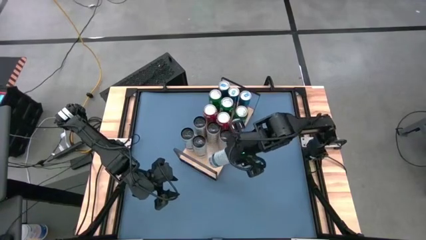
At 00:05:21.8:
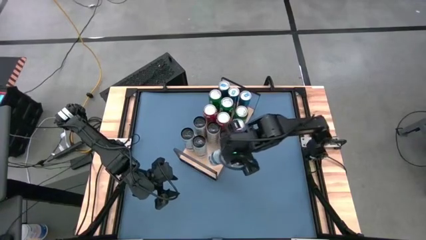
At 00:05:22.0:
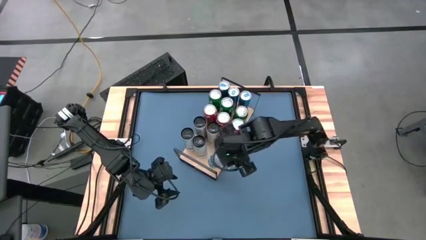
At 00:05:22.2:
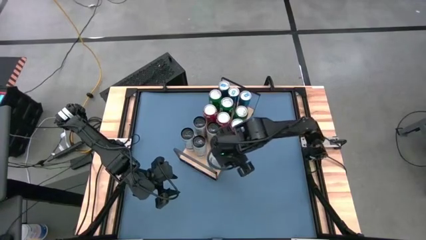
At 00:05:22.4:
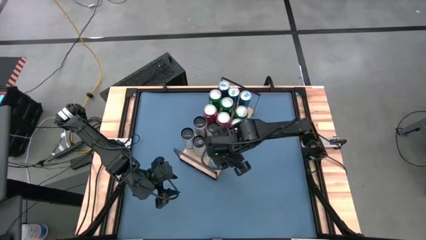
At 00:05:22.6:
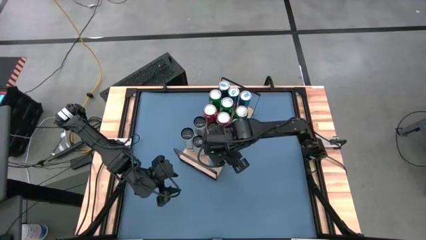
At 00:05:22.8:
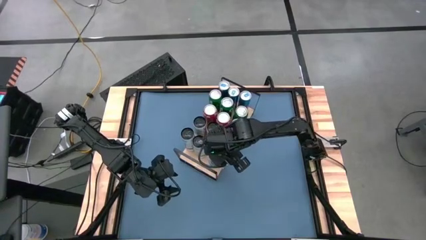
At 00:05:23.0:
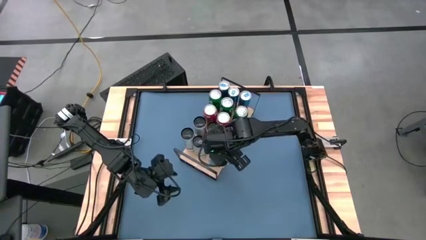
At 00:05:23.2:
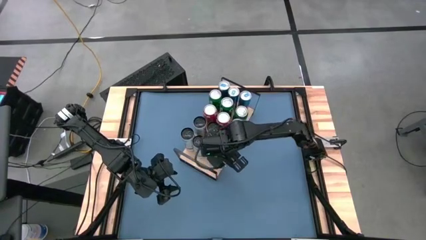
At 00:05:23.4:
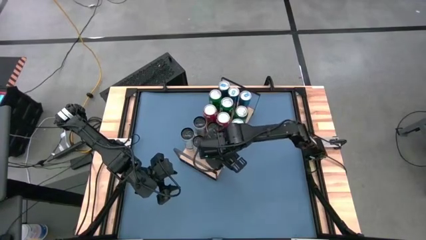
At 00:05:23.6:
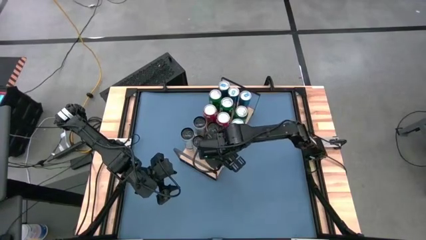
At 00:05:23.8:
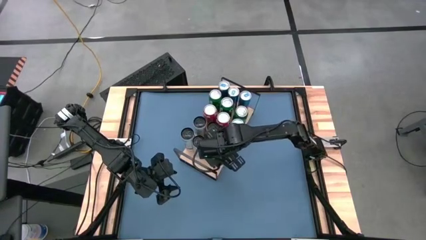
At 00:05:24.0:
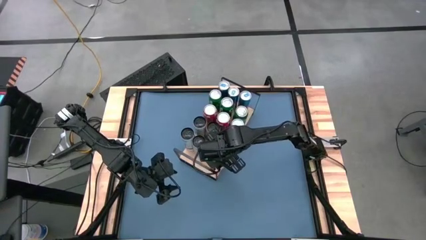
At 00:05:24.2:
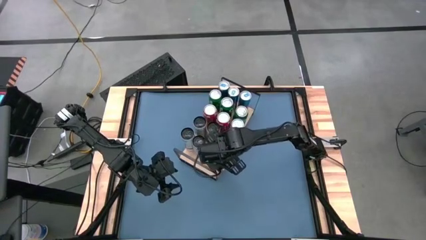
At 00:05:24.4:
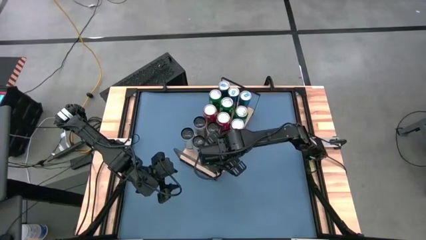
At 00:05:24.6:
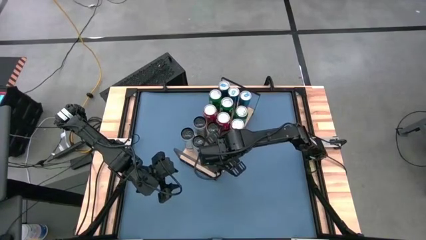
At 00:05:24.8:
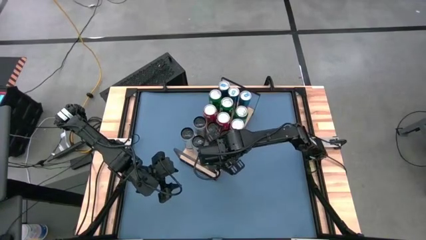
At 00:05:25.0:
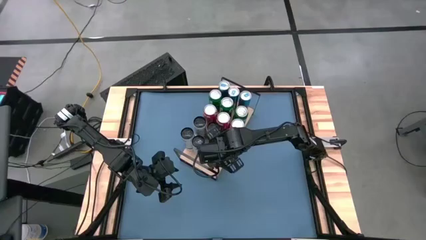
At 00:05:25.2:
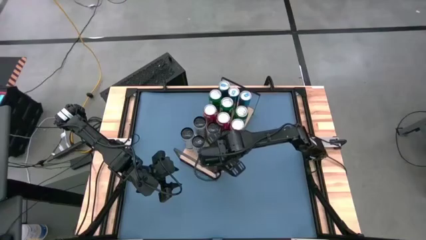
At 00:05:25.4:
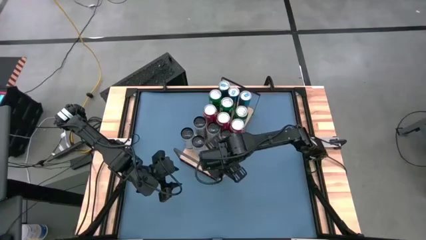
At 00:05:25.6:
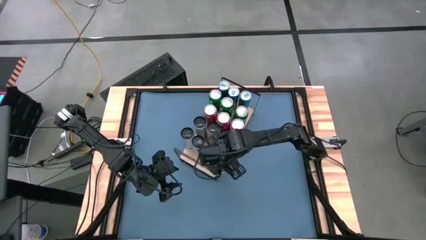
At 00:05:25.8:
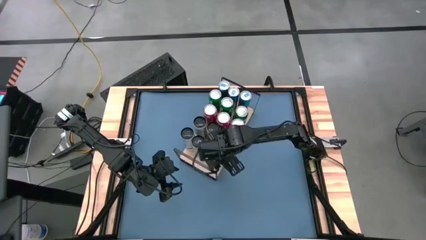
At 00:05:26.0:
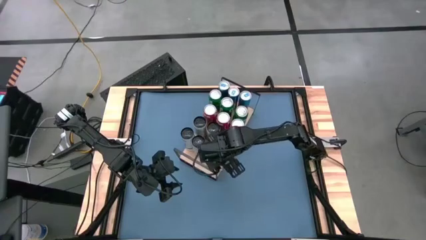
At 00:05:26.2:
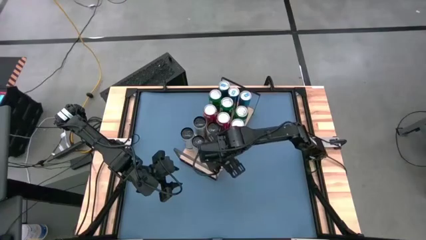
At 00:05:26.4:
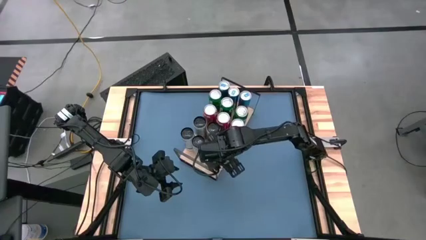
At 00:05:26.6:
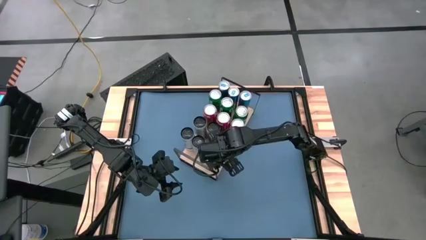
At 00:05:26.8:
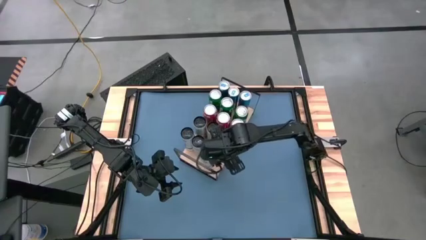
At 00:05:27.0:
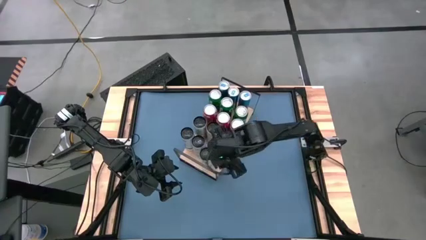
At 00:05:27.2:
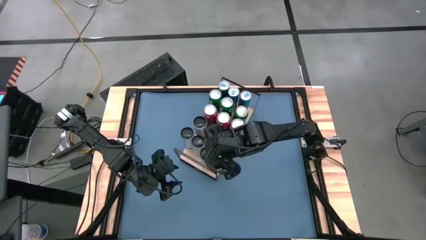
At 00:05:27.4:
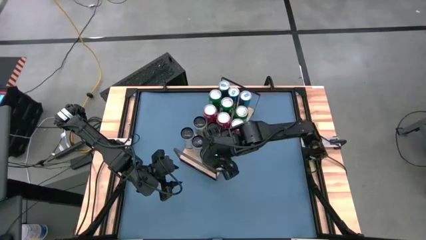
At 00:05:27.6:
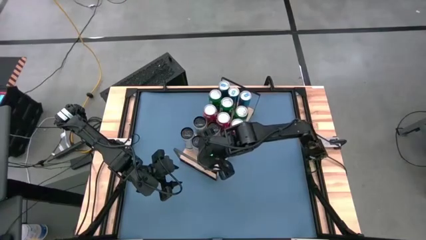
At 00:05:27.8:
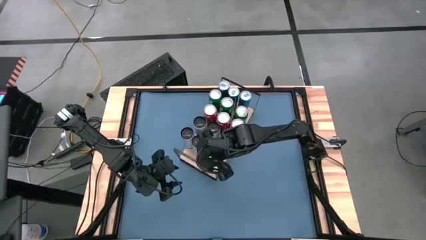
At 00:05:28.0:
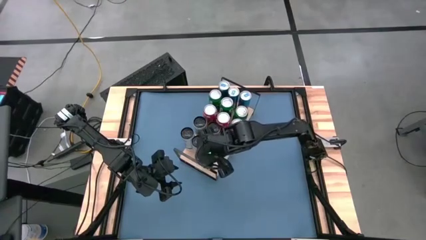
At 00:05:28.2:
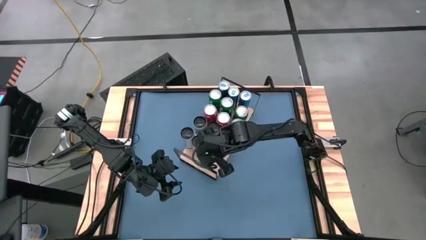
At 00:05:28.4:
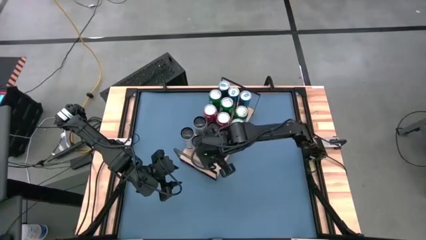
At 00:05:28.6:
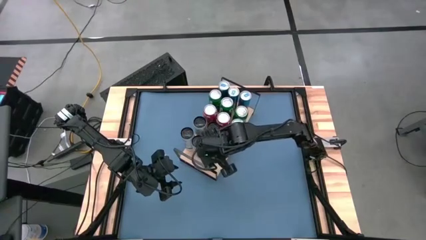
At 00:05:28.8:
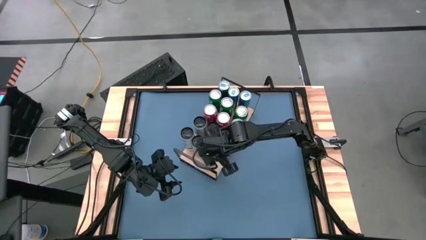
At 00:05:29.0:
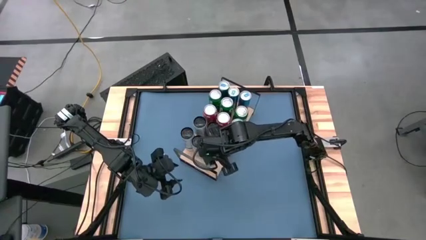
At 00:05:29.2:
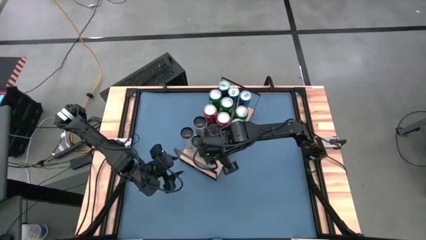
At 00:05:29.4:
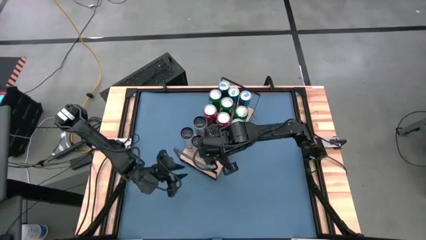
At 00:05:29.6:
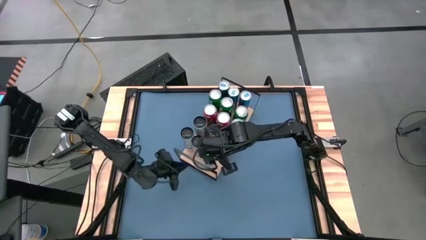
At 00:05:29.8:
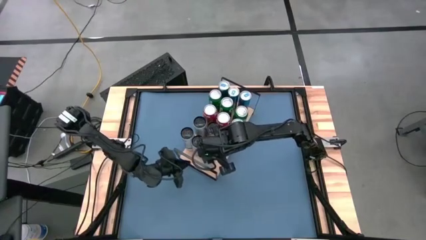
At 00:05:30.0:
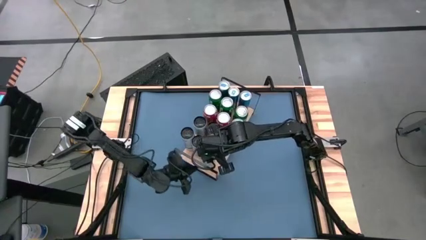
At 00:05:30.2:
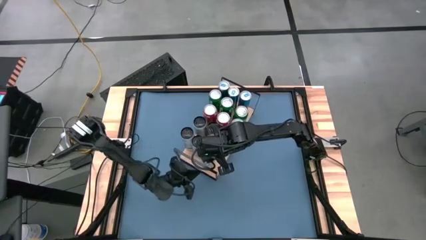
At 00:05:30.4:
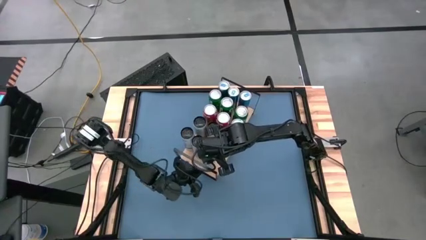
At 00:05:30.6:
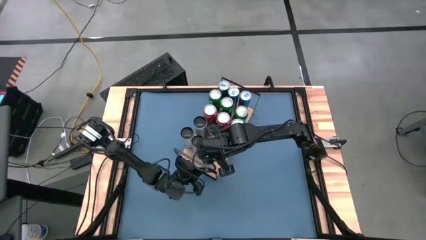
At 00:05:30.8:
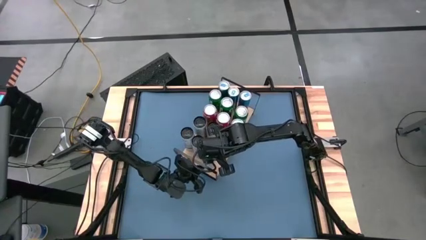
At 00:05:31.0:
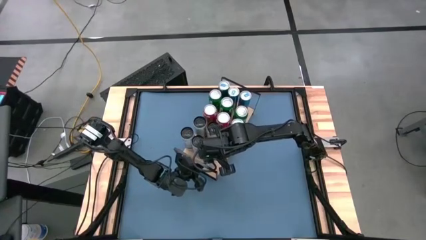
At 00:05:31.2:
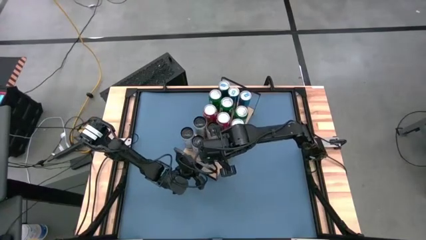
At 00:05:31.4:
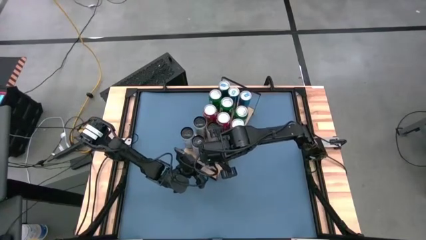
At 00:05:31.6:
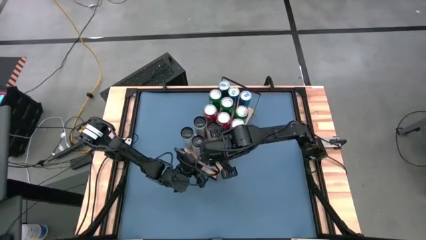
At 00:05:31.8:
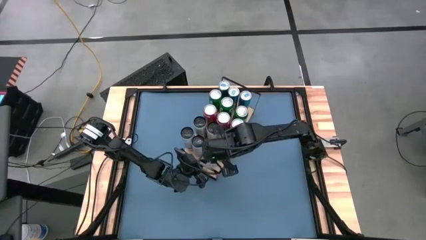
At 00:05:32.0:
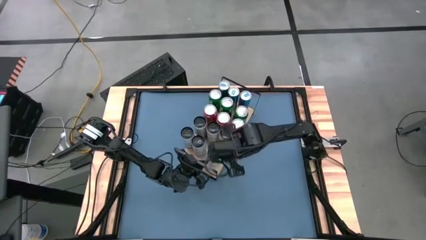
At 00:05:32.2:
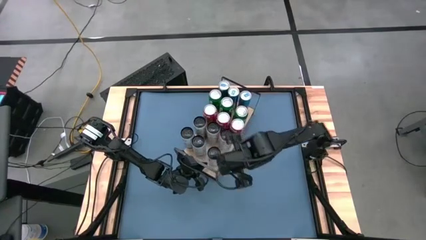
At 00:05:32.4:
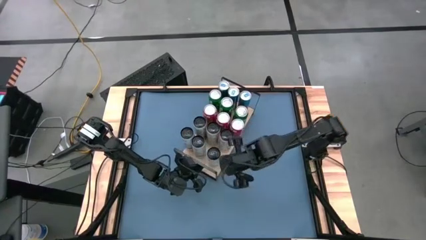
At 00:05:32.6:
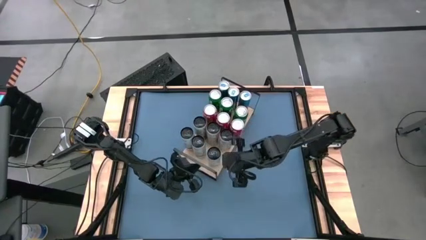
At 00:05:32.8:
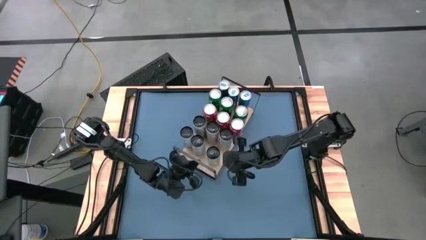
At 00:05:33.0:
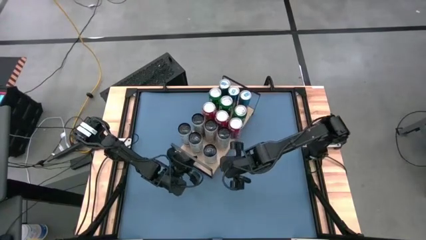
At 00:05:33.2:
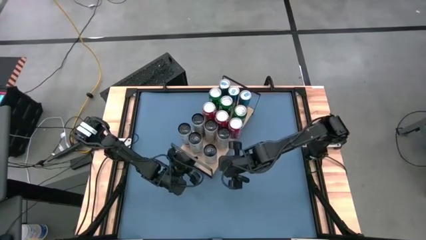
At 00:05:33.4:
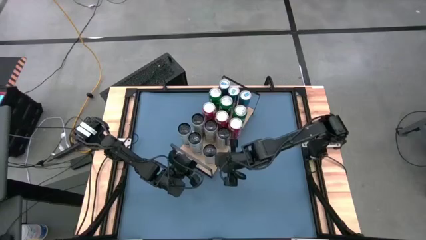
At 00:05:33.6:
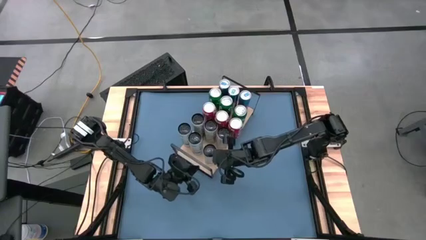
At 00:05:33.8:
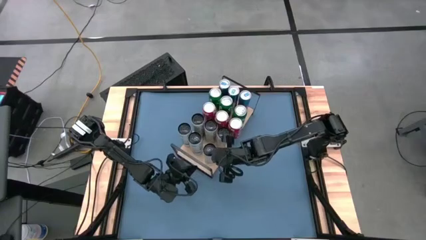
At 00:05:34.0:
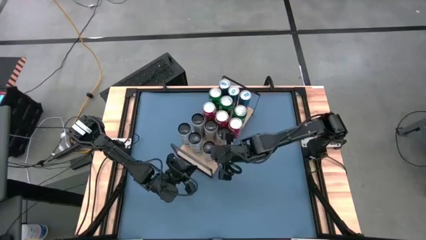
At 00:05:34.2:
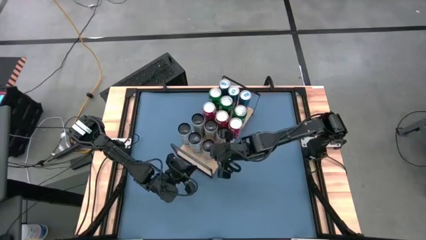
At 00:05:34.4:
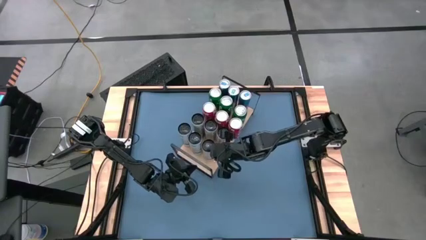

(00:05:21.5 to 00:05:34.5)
Task: Place canned beverage on shelf
Put white blue soda can on the shelf aligned with the other white blue soda cans

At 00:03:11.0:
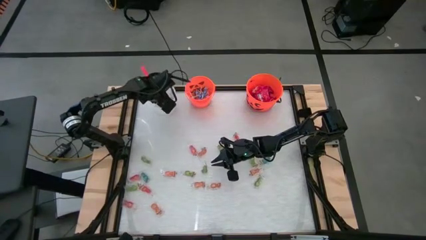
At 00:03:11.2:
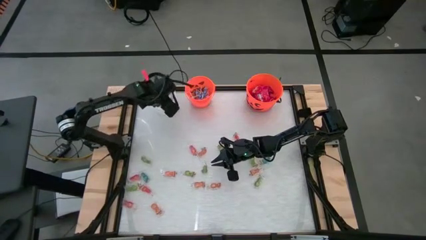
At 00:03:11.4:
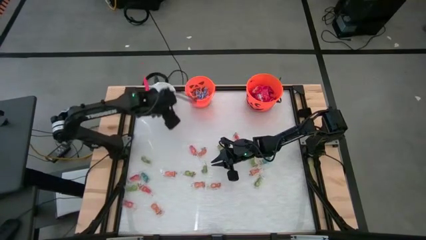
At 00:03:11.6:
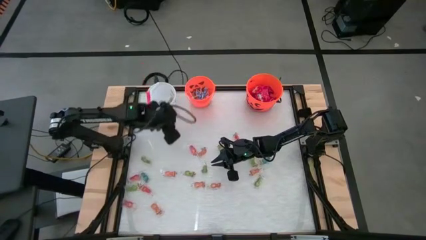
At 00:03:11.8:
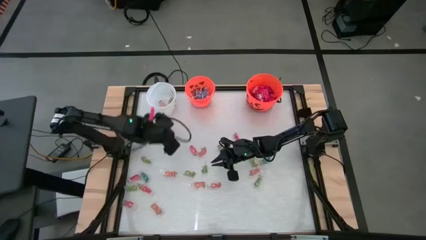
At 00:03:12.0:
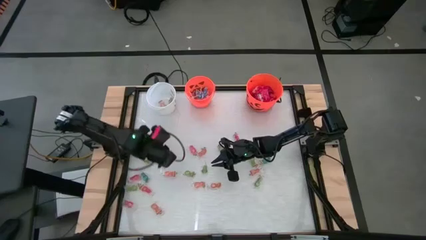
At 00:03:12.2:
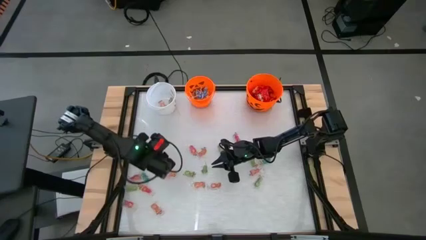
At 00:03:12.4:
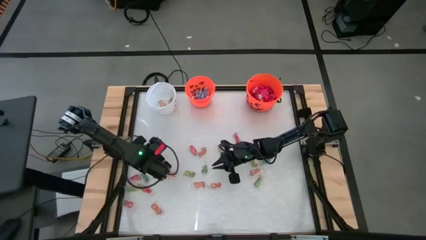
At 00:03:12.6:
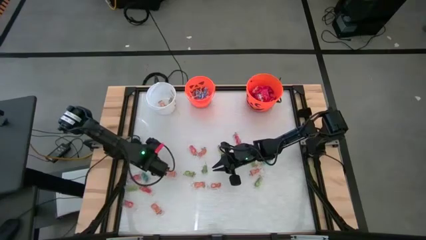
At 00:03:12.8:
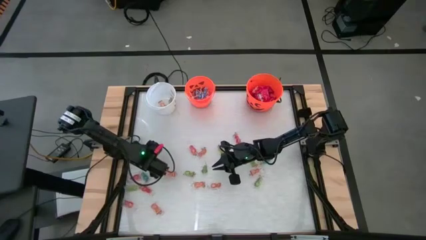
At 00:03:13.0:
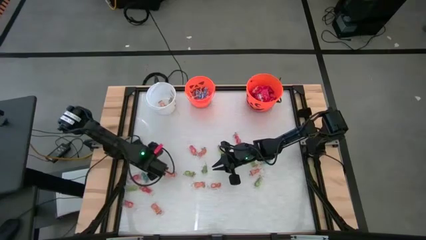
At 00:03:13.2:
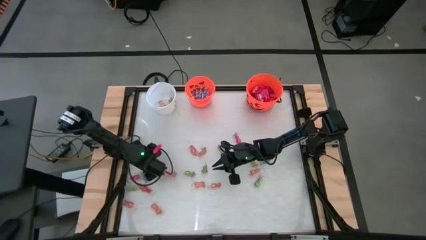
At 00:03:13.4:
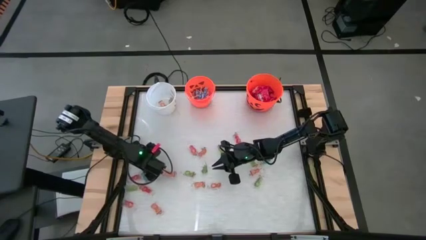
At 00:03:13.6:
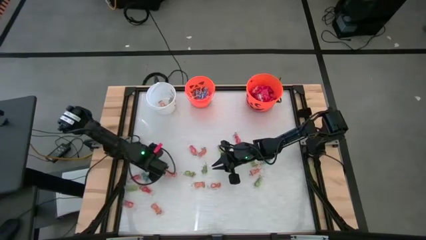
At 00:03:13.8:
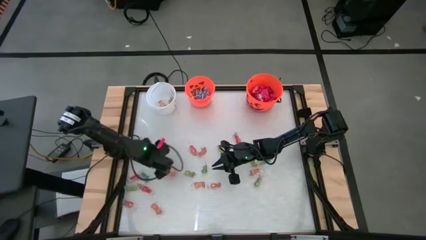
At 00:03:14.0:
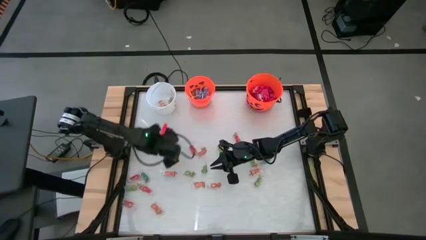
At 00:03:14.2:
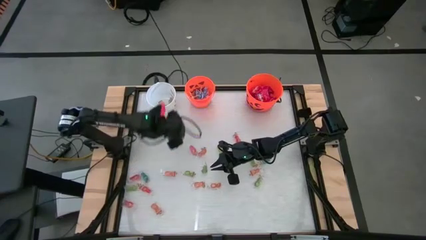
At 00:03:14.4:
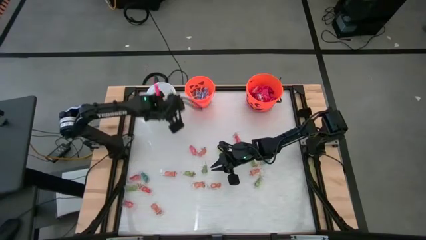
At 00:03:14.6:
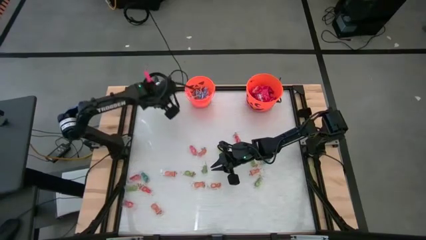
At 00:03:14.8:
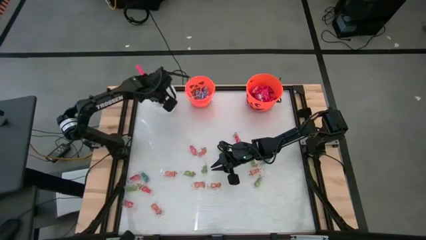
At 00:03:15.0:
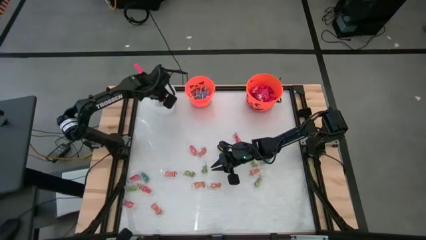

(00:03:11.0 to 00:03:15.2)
Task: Sort candy by brand, put in halloween buckets
Put the green gummy into the white bucket
